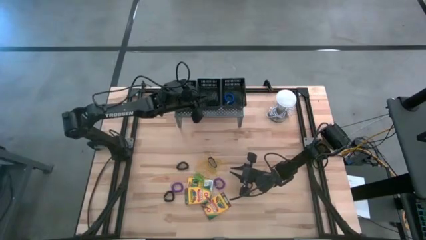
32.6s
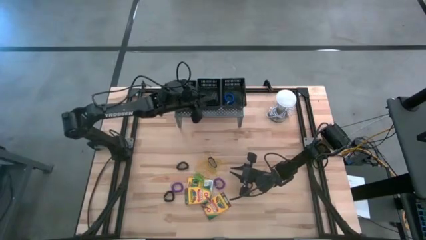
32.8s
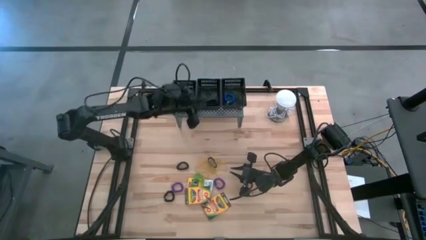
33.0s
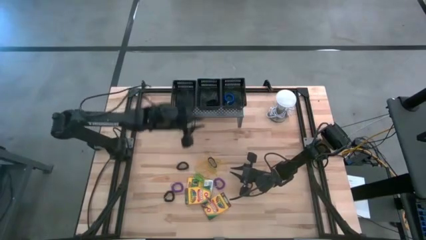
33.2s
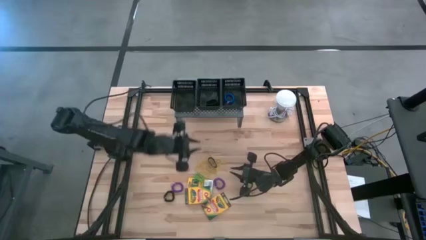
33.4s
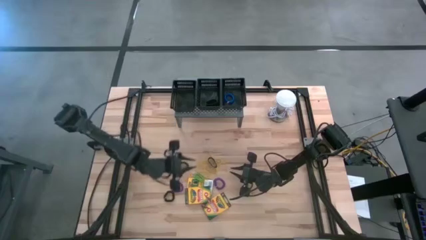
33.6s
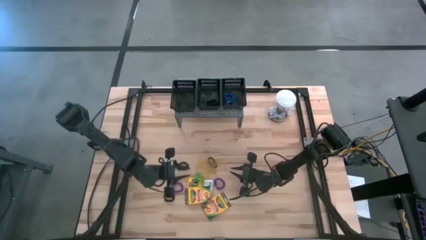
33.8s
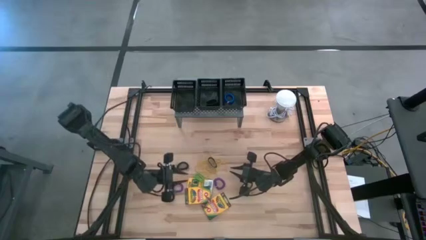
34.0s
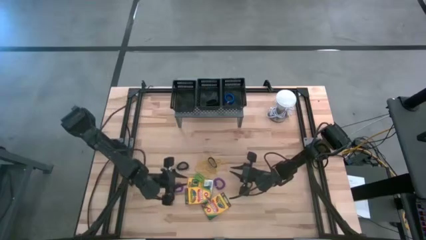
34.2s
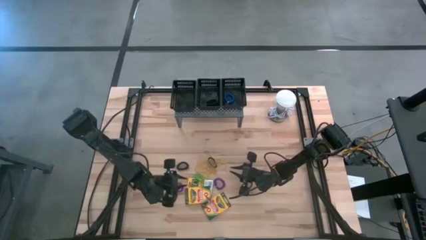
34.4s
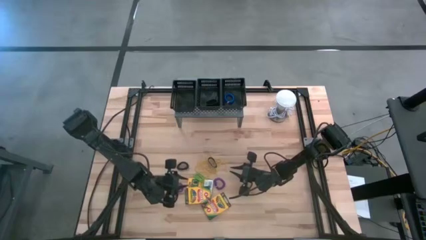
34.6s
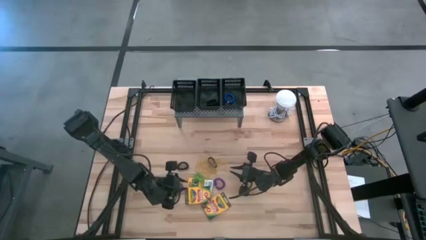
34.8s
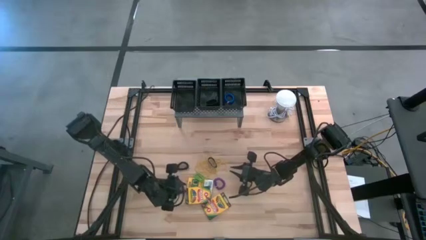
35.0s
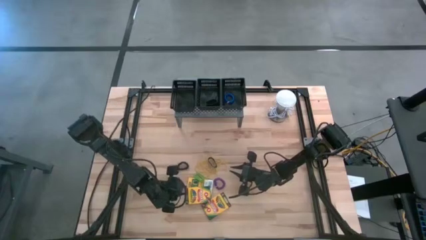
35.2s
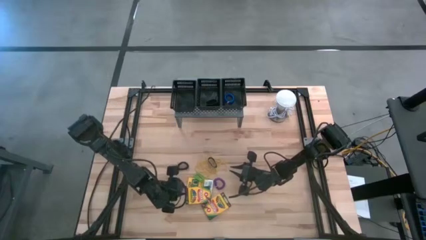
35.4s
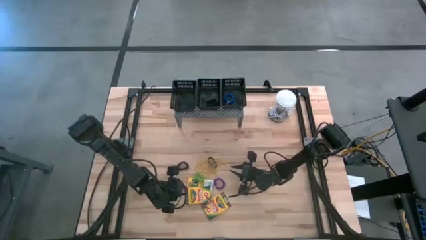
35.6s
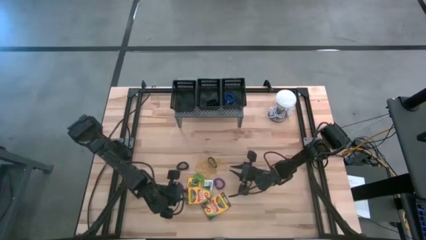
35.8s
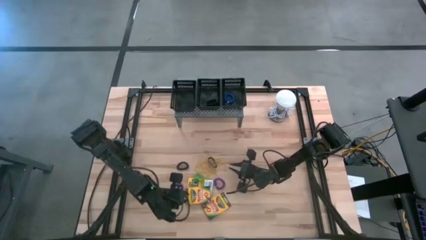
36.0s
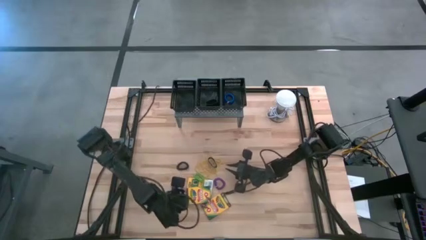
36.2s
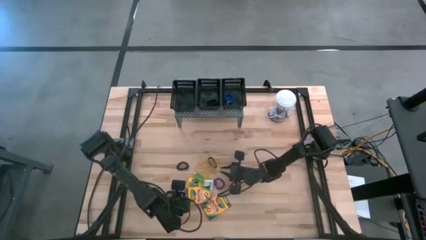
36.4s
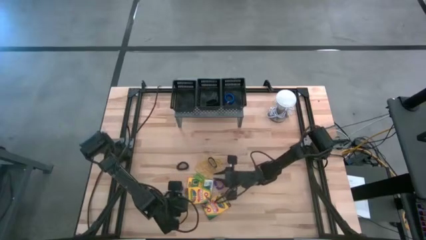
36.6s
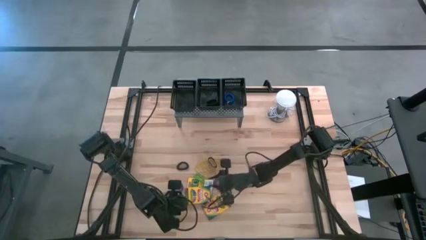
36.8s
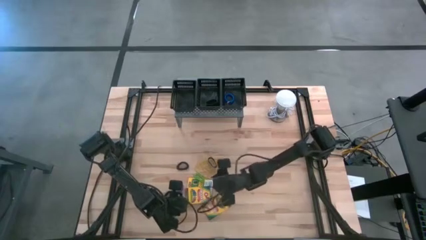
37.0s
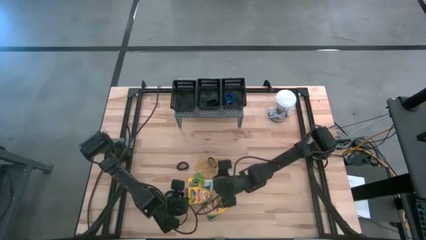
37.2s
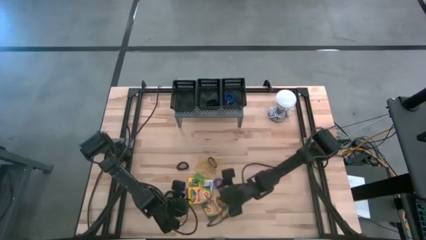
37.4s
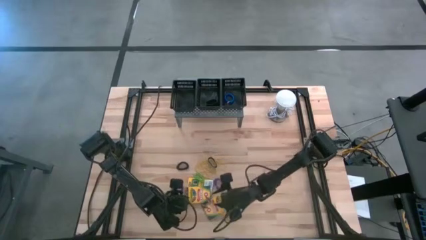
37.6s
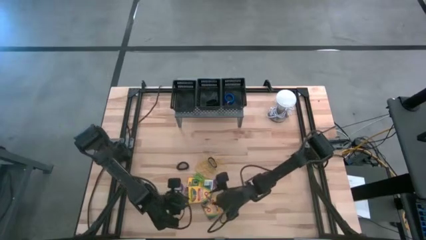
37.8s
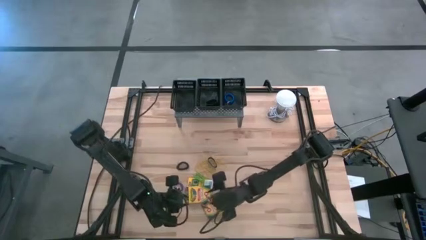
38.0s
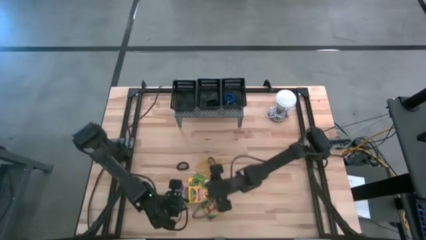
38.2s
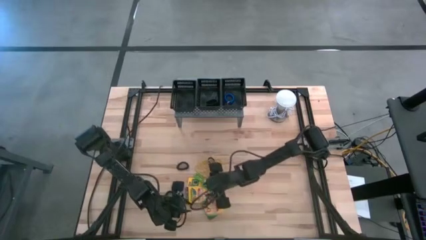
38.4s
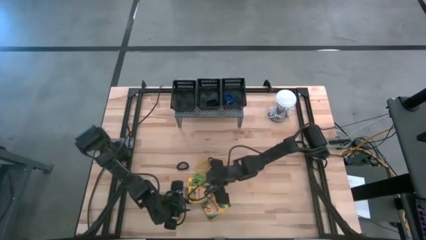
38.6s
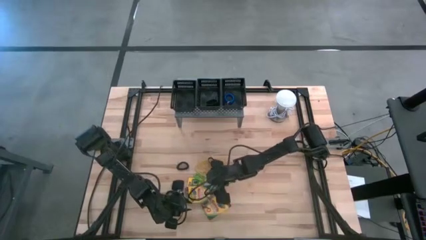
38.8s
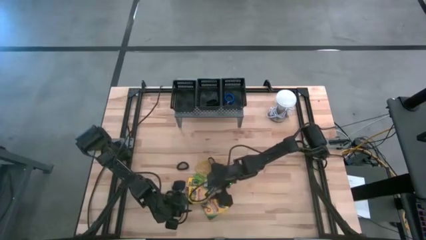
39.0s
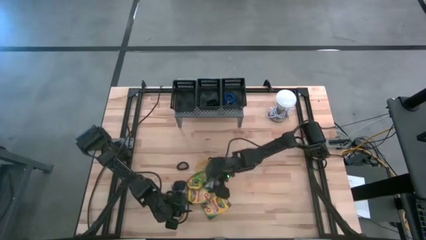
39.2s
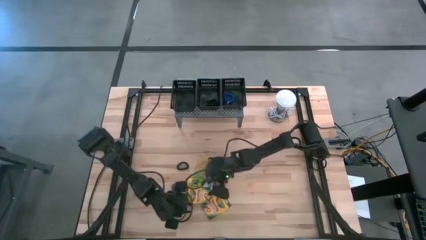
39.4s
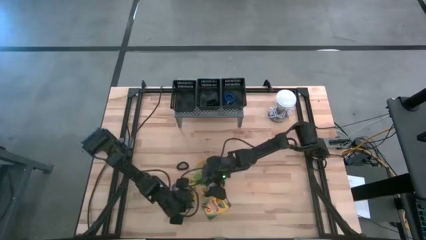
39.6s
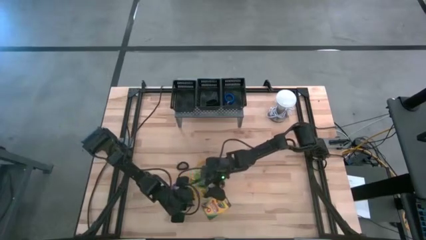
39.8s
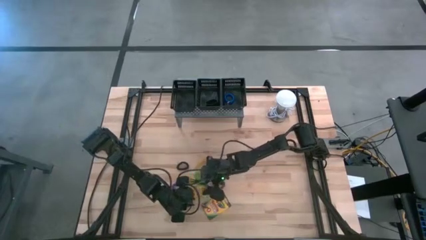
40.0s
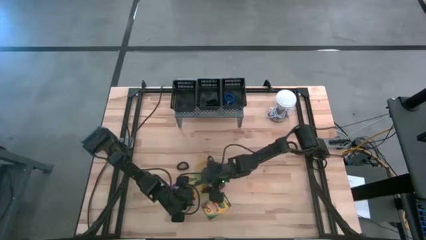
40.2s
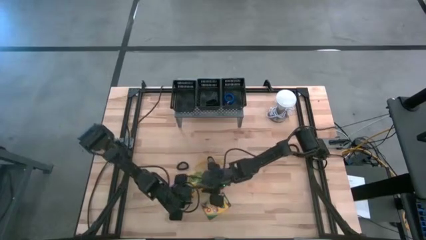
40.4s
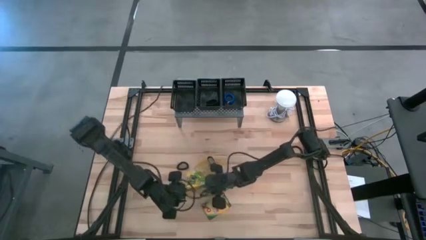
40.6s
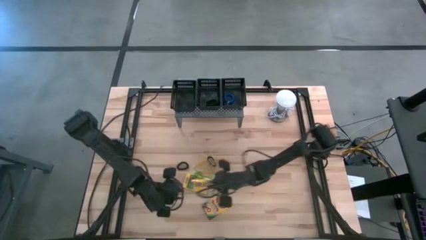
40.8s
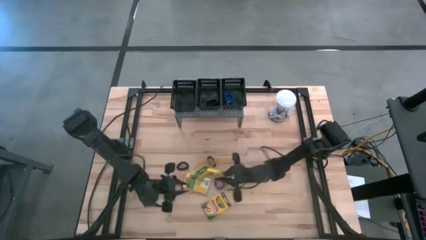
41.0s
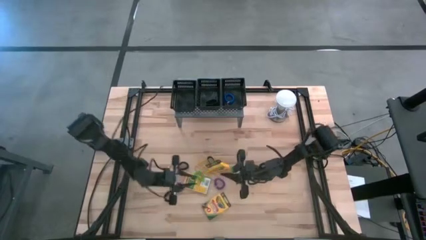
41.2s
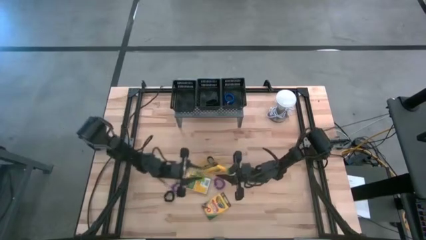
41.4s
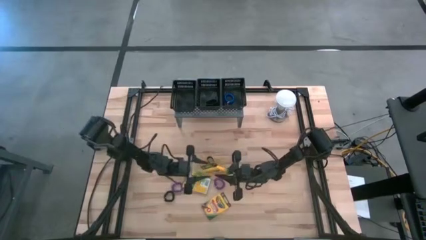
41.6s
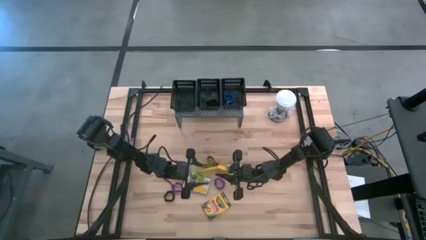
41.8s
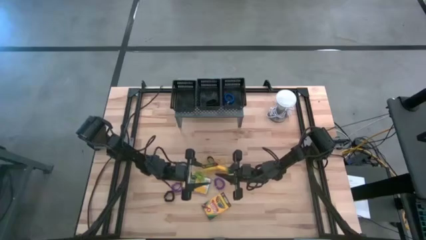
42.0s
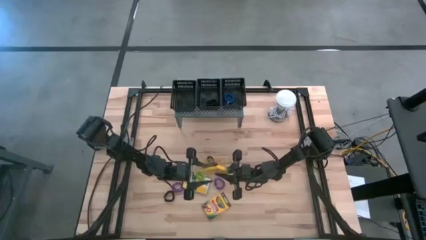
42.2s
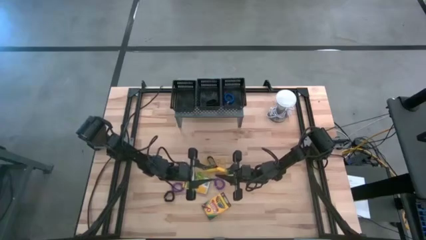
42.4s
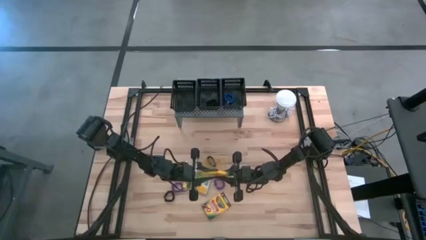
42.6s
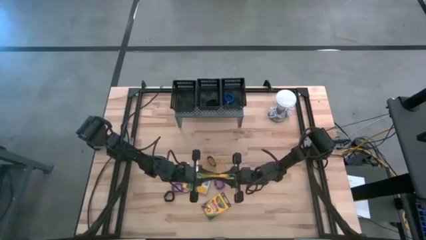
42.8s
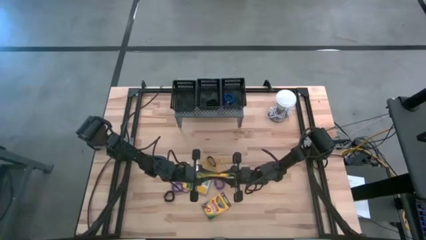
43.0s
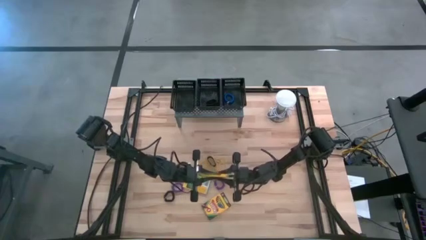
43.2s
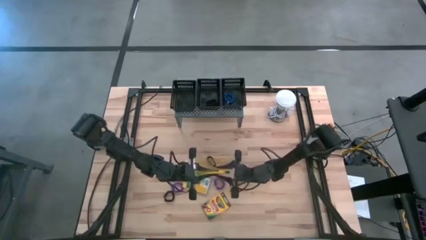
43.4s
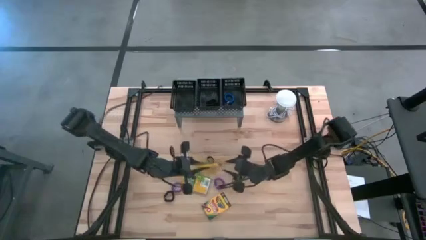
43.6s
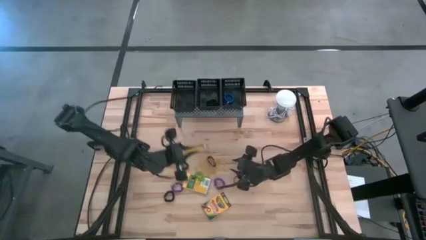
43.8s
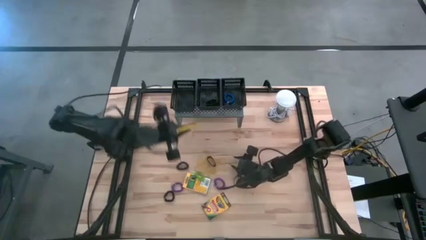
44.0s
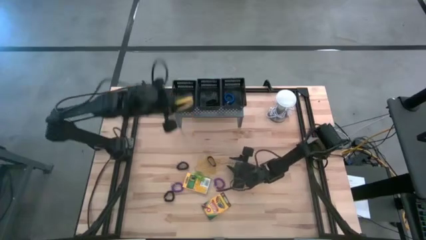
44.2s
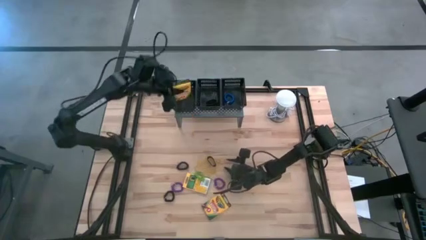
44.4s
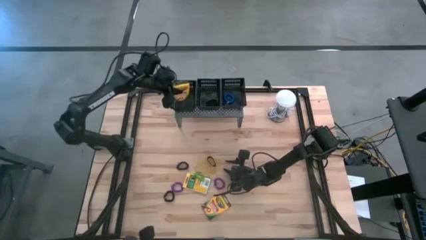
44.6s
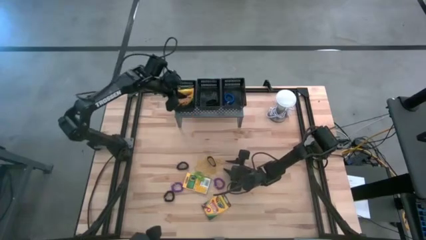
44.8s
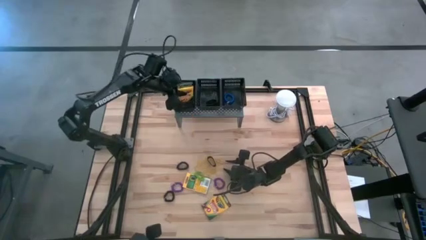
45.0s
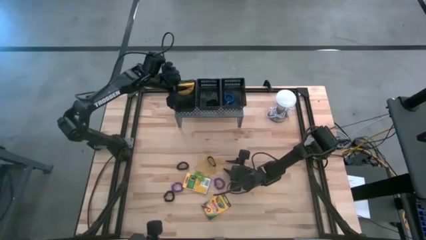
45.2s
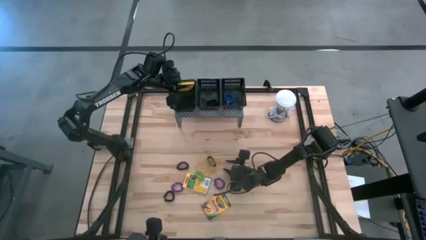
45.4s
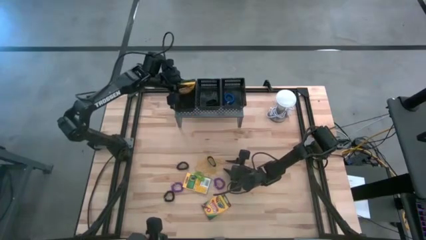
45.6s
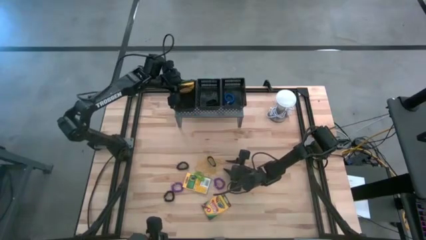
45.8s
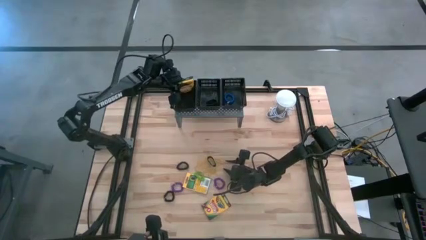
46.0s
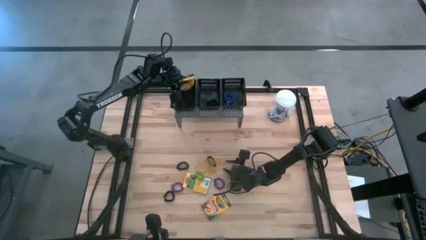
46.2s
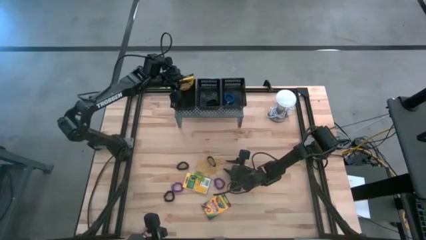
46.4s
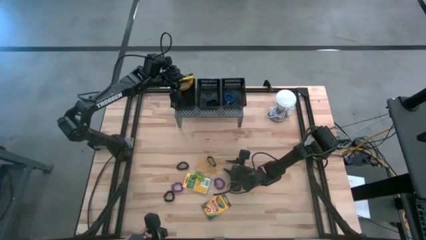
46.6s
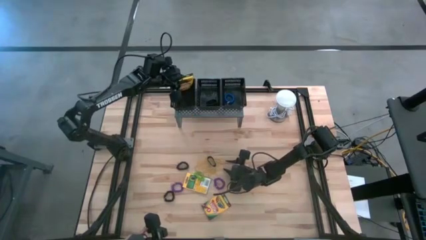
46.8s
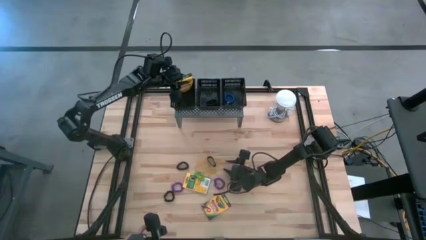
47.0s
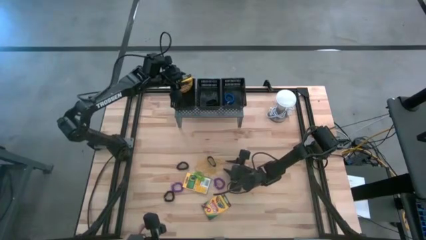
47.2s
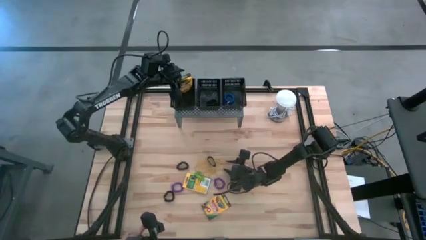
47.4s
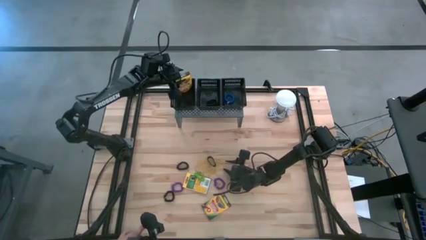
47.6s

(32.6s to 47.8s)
Task: Pick & Place Office Desk Supplies
Put the yellow crayon box in the left black bin on the shelf

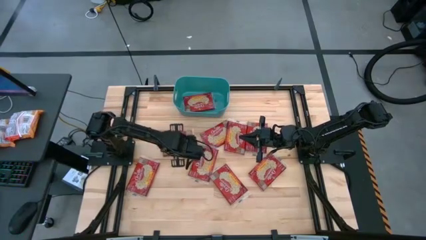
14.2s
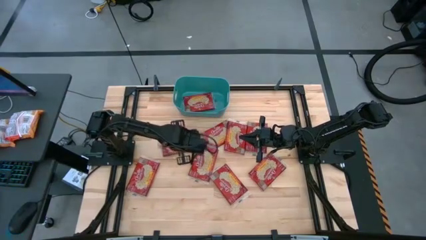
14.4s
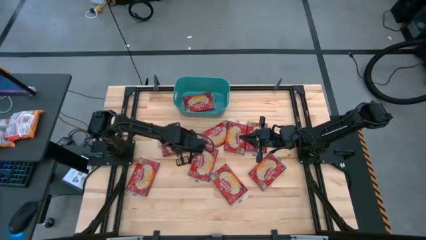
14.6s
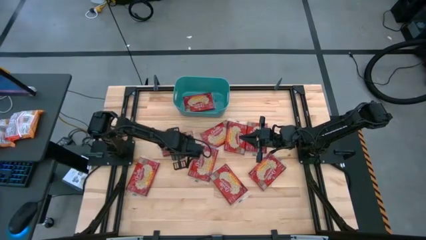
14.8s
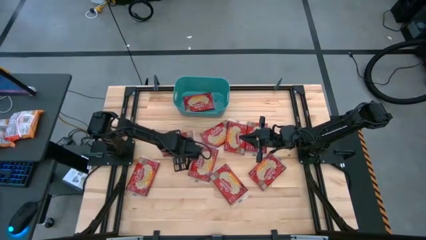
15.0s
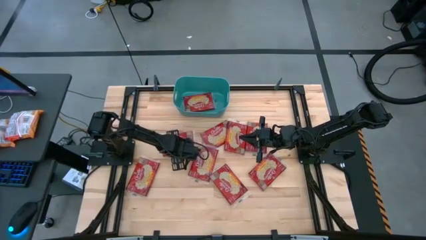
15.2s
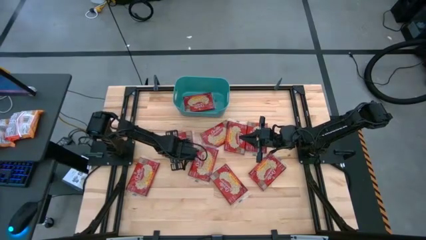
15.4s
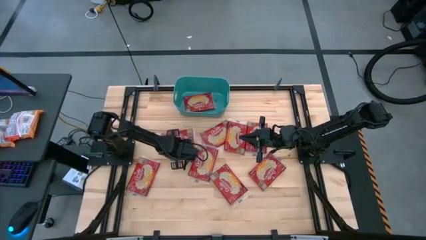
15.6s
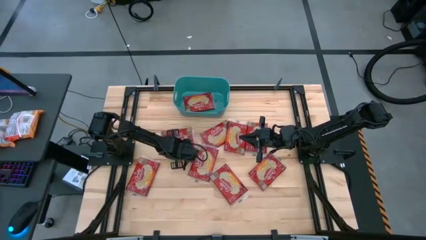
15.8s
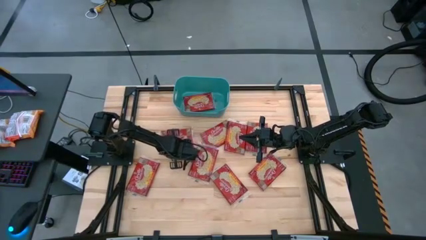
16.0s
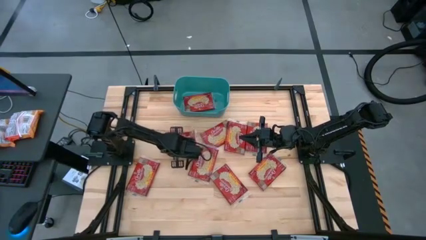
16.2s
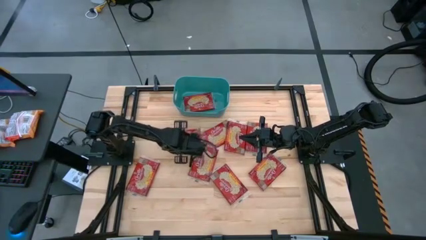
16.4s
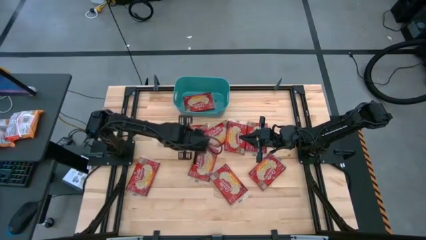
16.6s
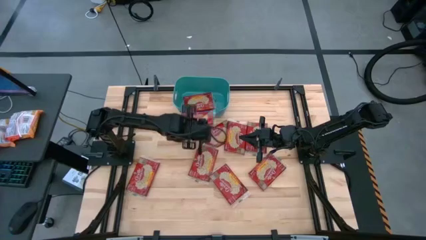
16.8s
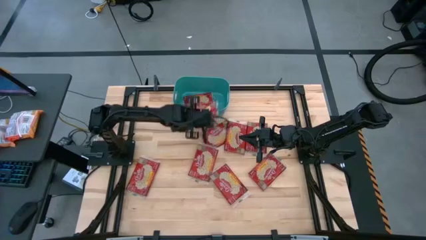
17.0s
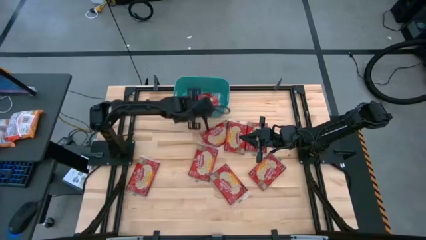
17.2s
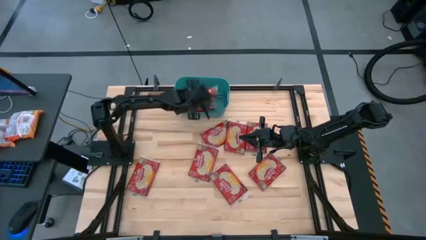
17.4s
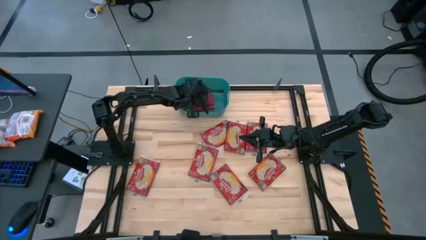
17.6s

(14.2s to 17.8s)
Task: Sort popcorn bags into baskets
Put the popcorn bag into the green bin
